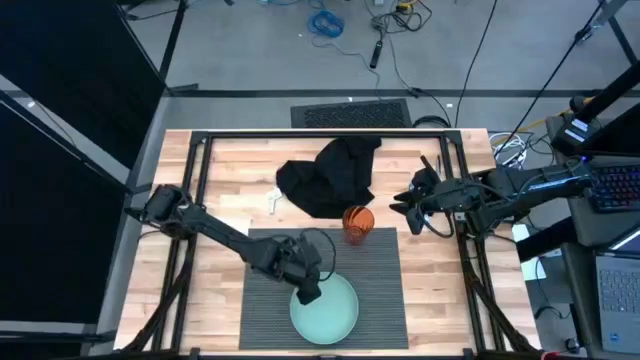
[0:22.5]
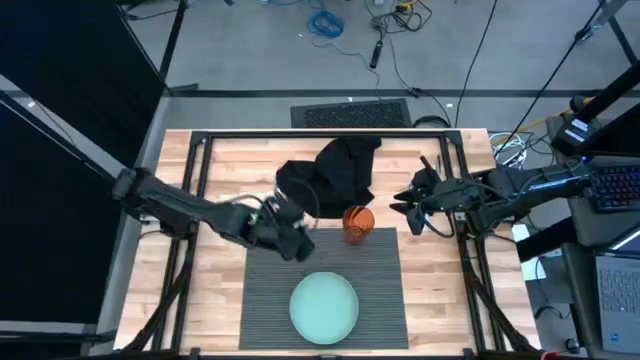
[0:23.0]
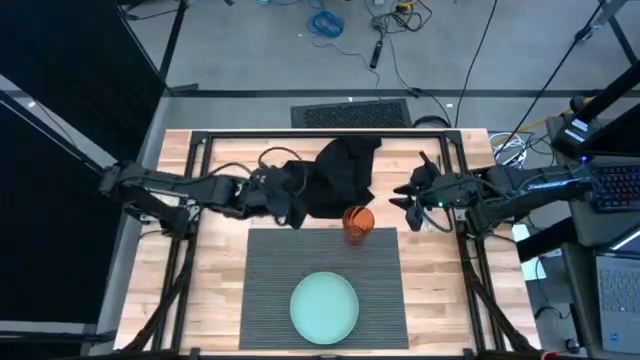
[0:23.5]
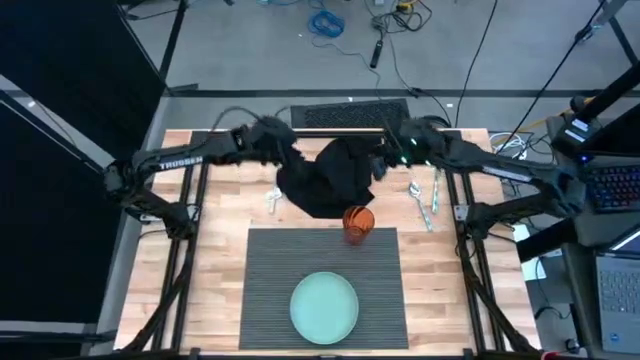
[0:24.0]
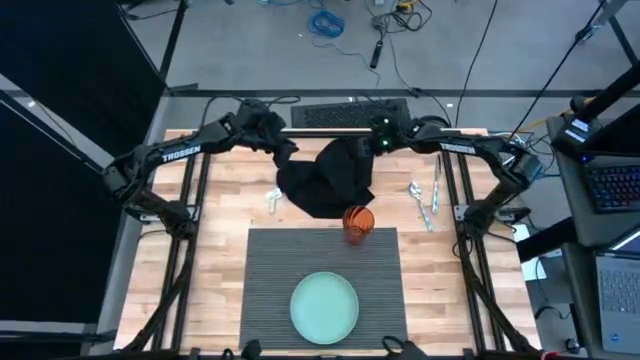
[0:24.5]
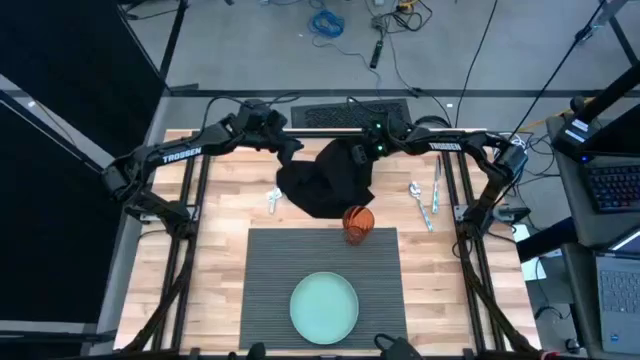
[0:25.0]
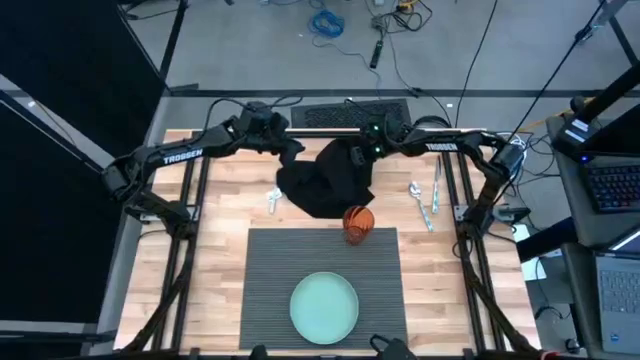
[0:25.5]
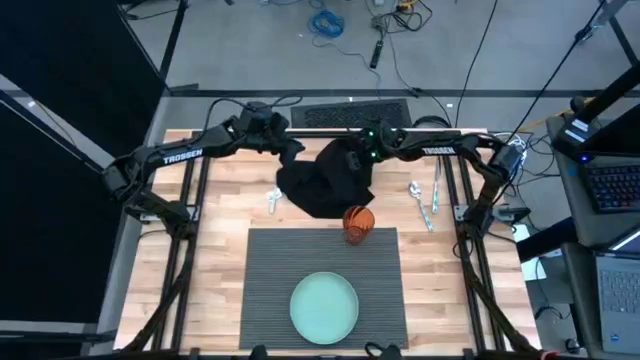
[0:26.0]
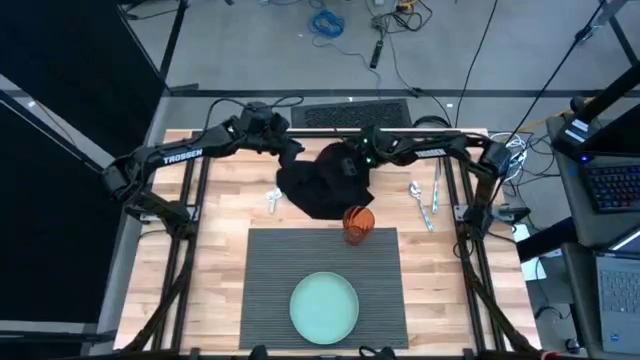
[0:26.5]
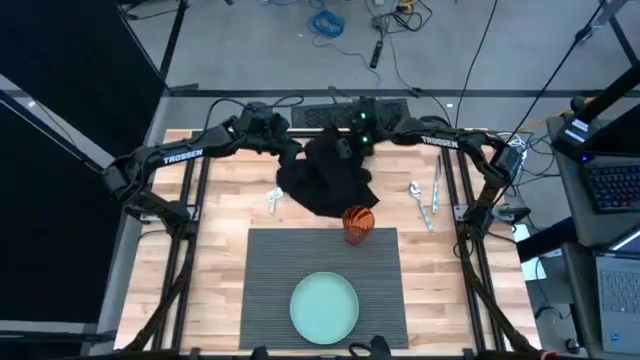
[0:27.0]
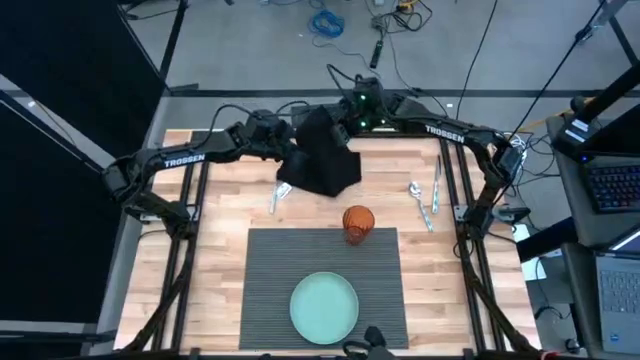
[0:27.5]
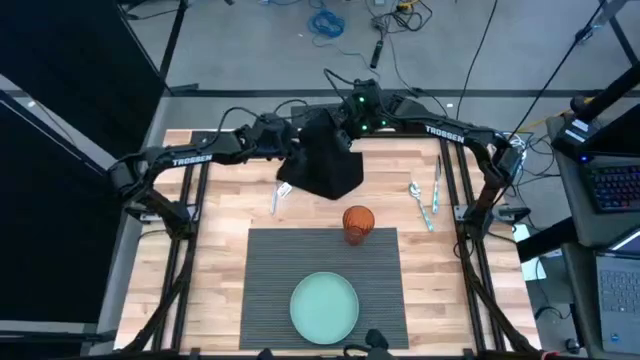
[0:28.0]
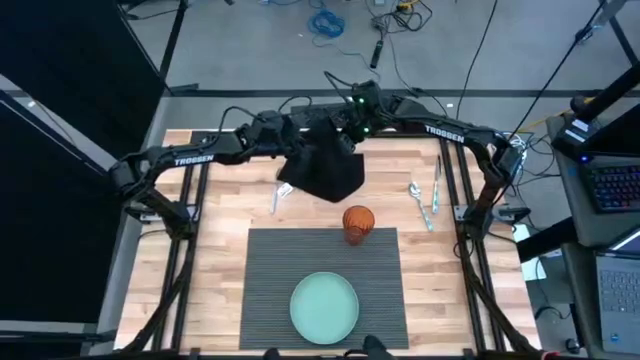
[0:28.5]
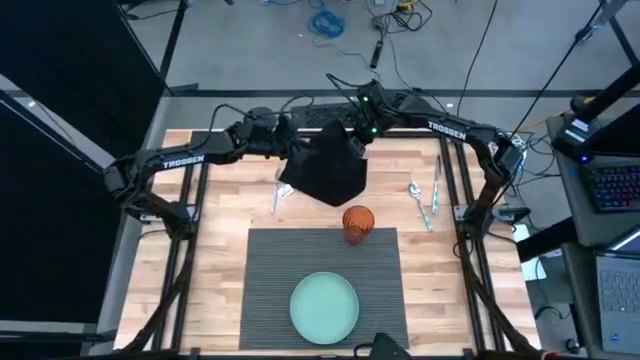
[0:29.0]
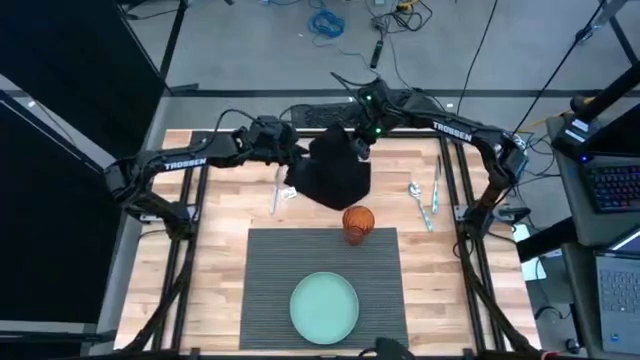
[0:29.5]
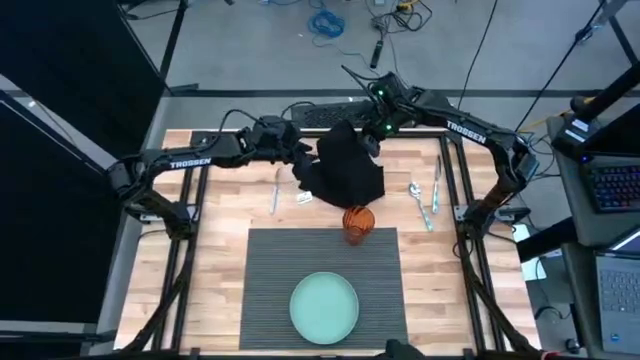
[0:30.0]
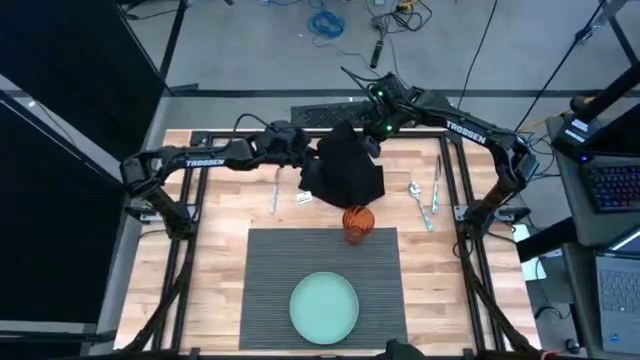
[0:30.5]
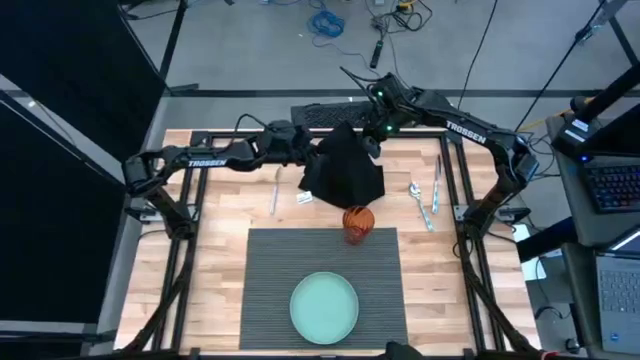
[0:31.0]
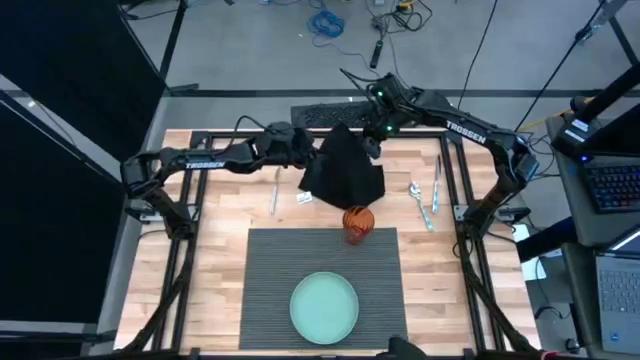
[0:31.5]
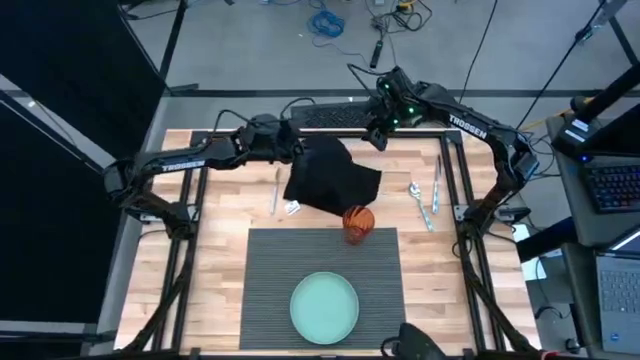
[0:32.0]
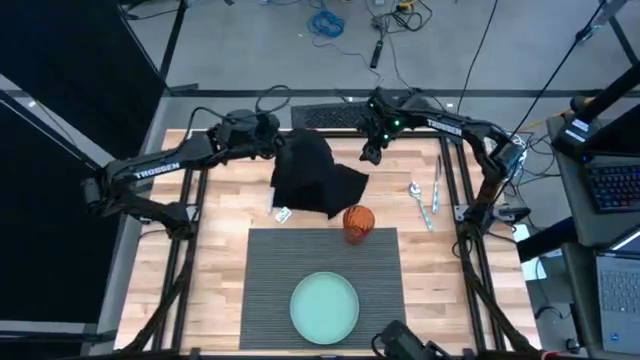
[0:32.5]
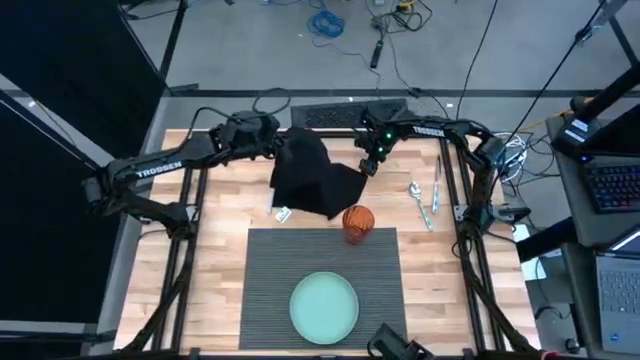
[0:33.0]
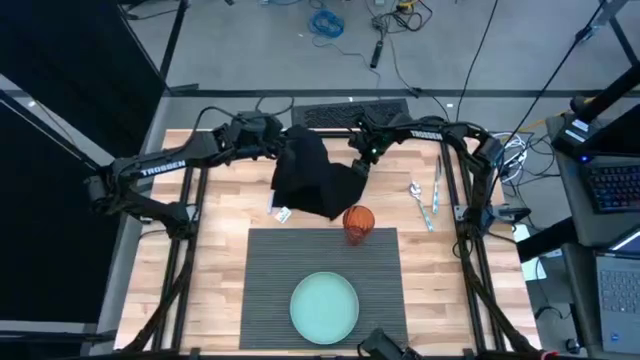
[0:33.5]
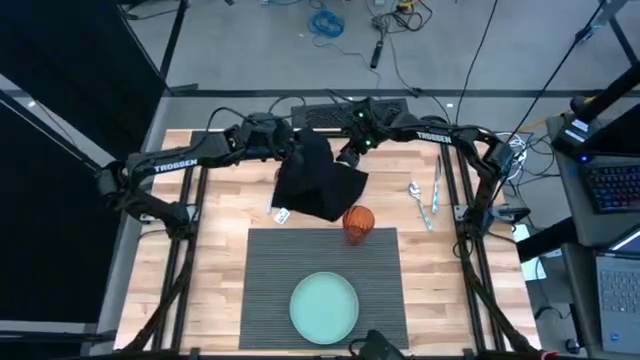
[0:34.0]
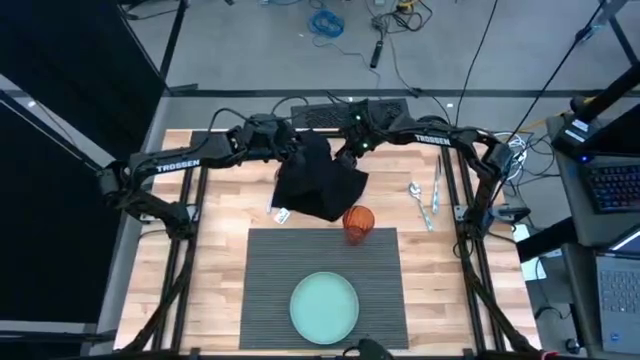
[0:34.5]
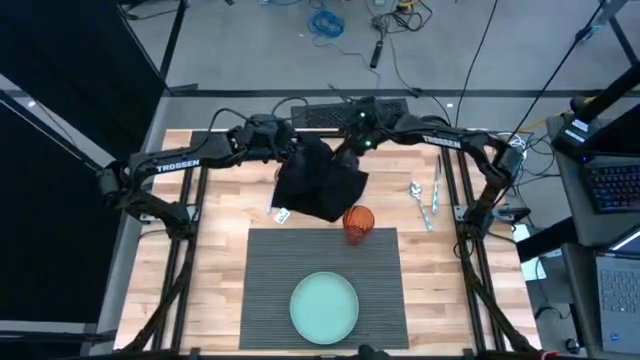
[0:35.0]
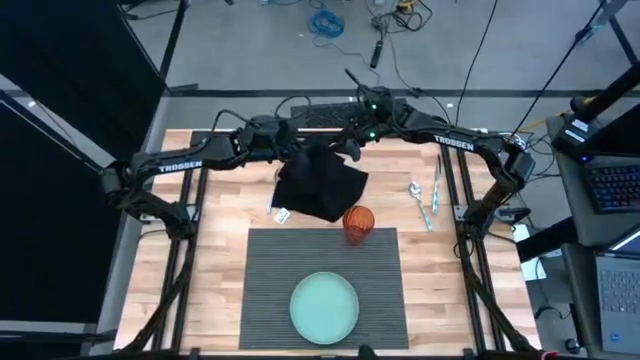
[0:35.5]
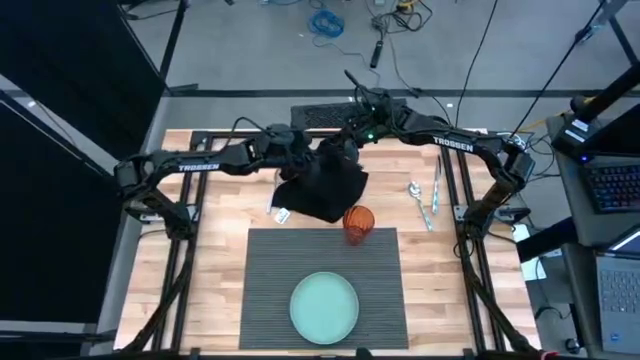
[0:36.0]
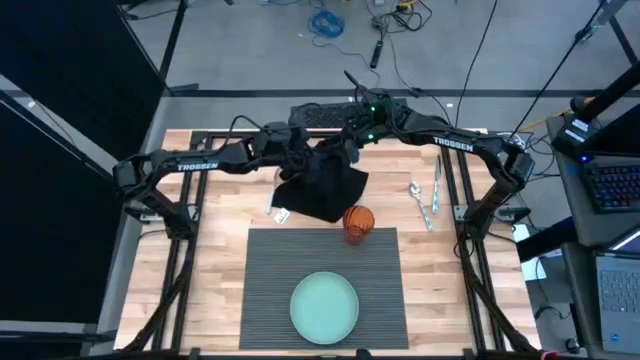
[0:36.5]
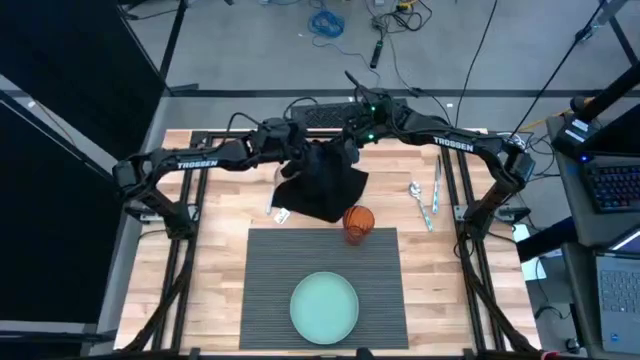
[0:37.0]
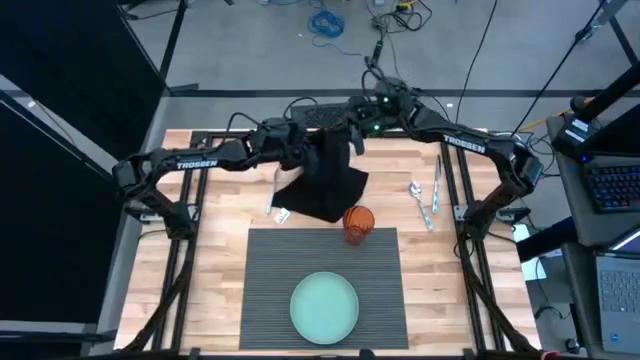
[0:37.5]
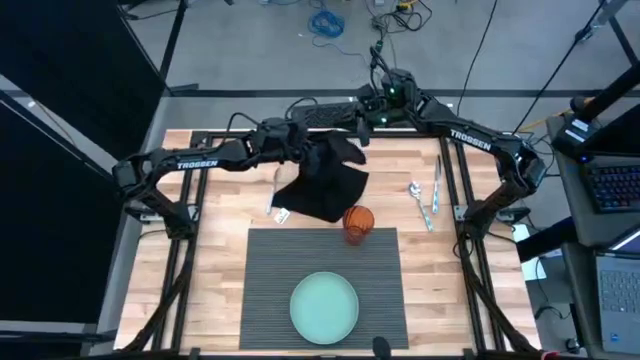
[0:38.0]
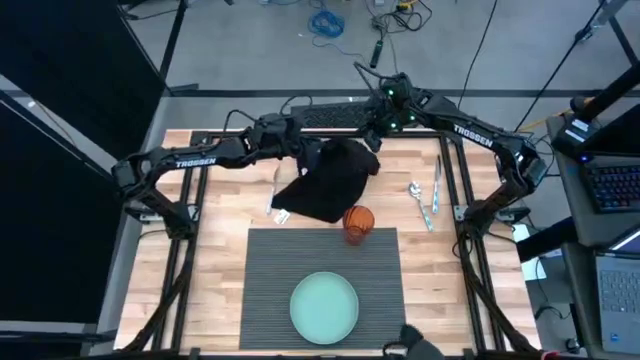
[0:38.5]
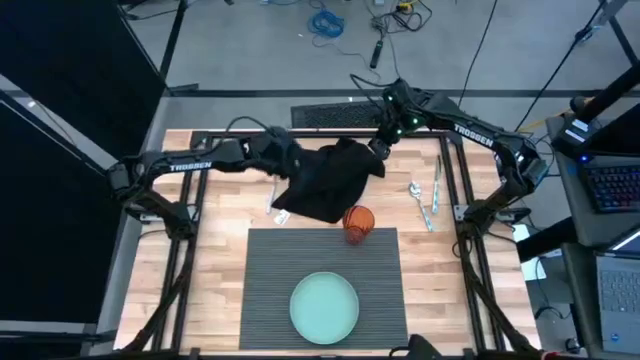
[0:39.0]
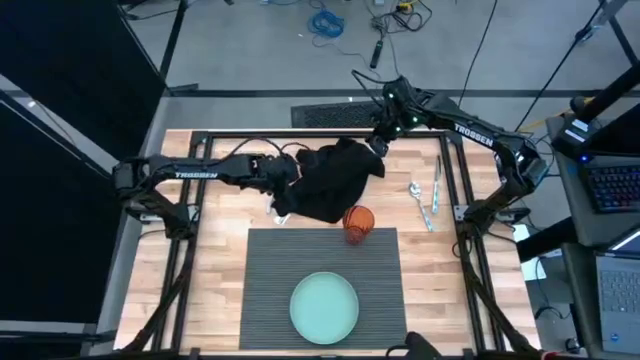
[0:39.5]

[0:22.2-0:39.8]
Task: Set table place
Fold the black napkin

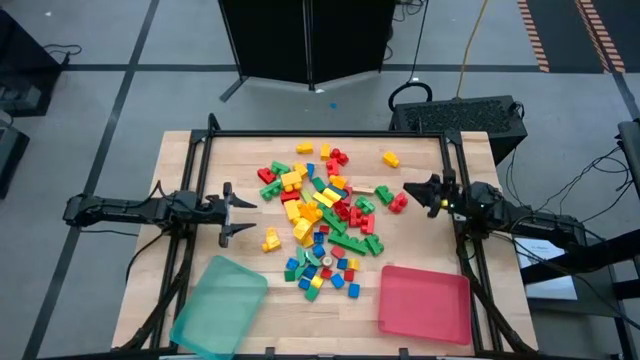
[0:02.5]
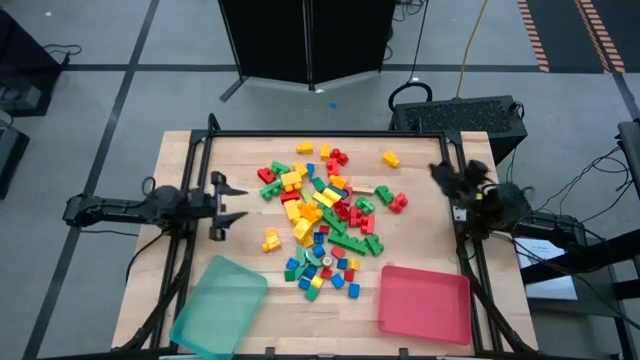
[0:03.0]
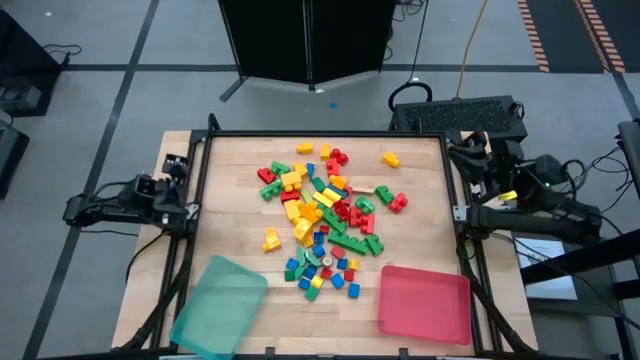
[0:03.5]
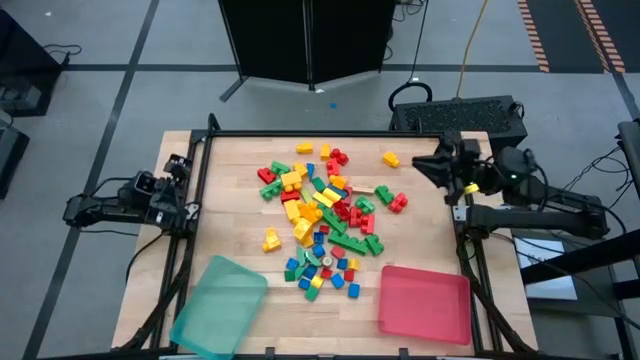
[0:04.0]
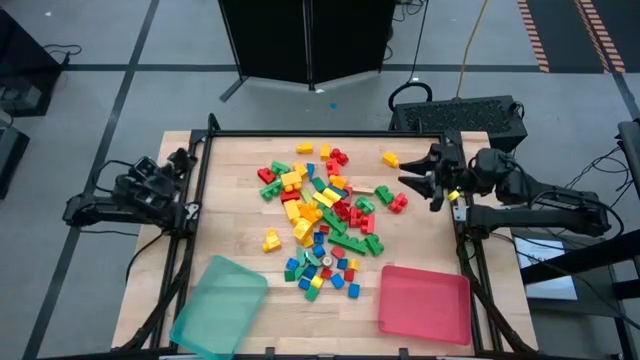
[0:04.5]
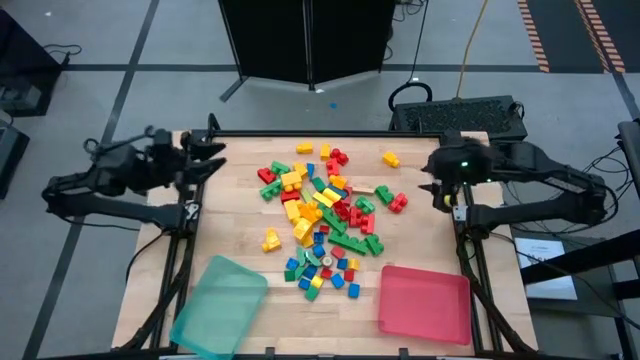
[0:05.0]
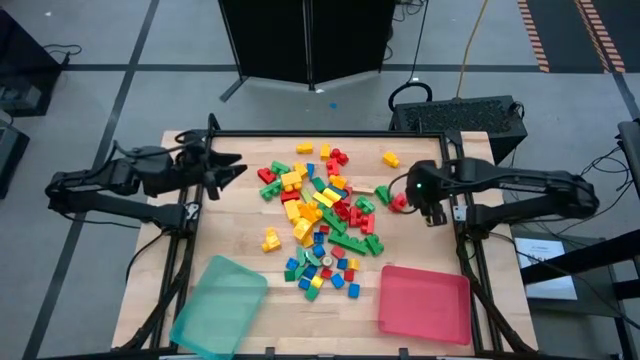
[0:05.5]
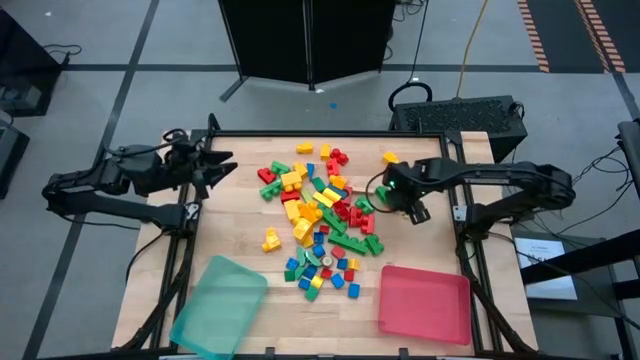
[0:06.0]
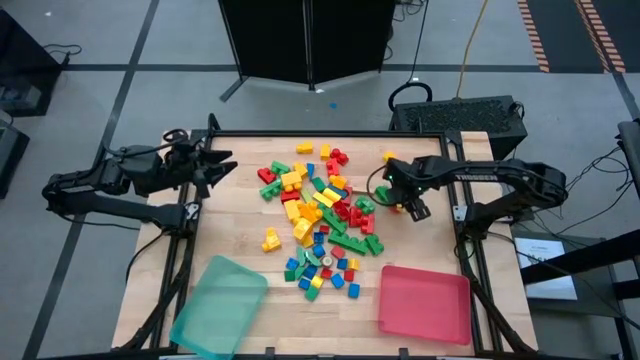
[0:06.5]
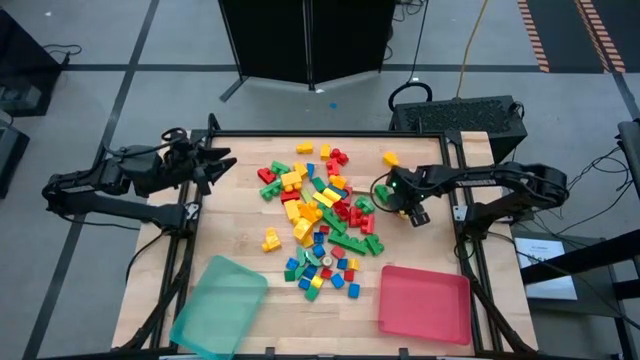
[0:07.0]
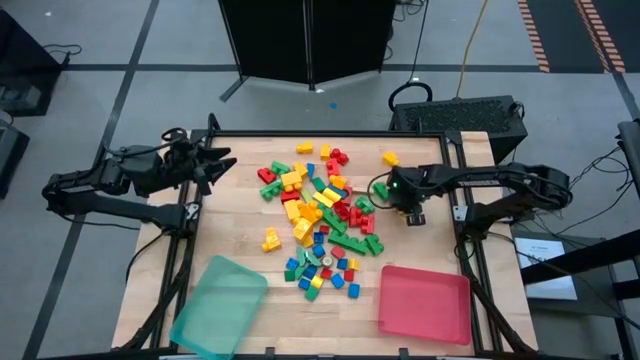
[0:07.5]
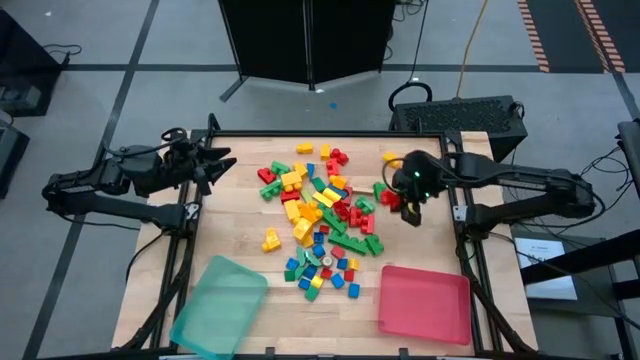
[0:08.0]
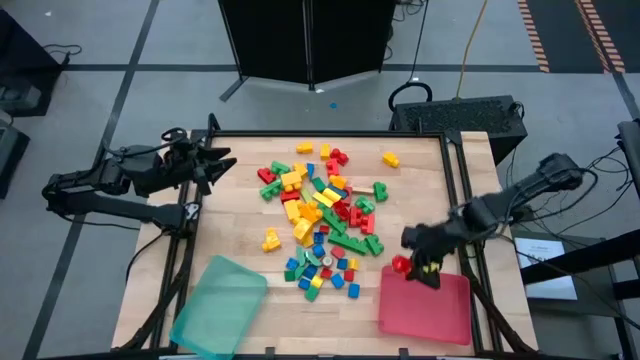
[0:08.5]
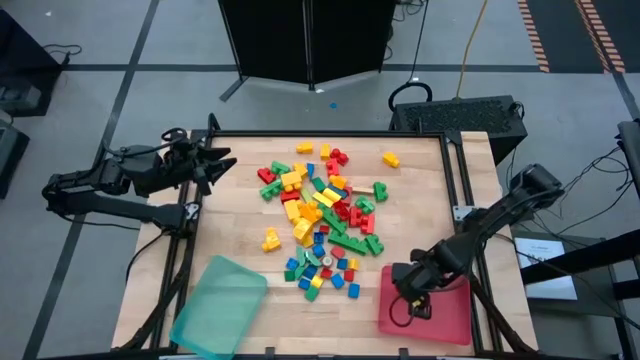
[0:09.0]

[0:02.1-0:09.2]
Task: Sort blocks by size
Put the 2-stud red game piece into the pink bin
